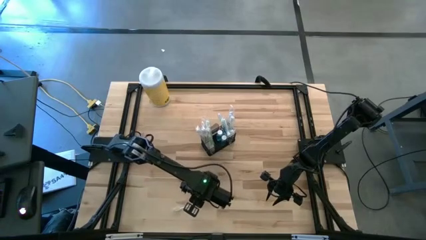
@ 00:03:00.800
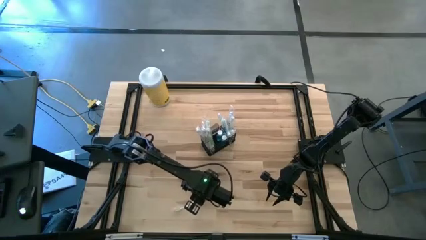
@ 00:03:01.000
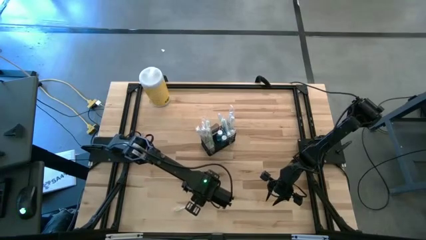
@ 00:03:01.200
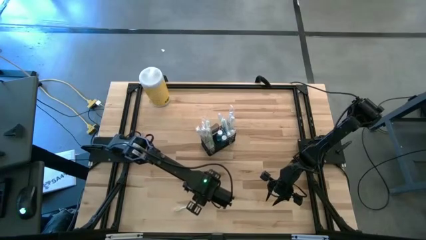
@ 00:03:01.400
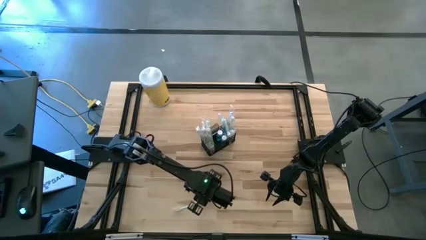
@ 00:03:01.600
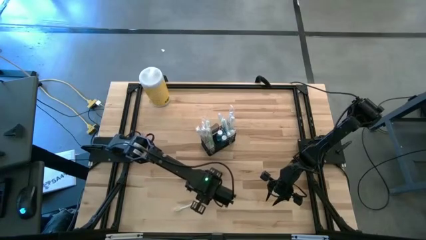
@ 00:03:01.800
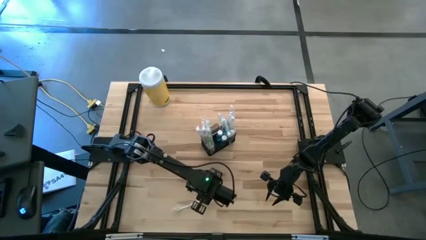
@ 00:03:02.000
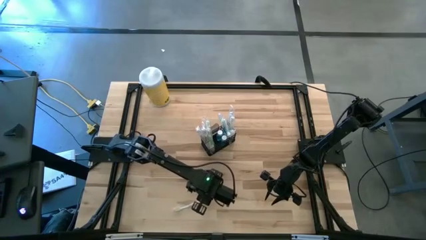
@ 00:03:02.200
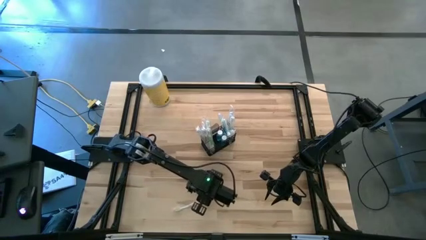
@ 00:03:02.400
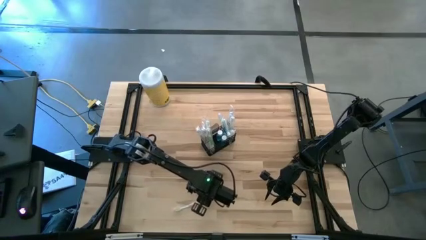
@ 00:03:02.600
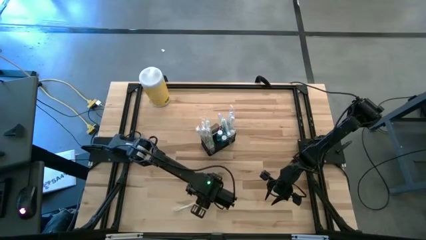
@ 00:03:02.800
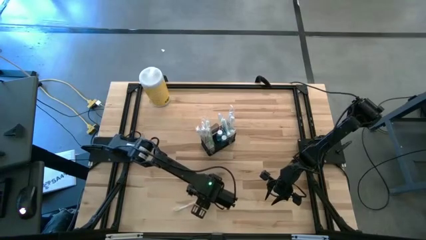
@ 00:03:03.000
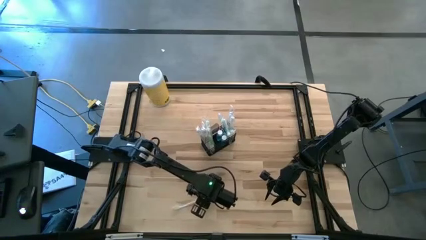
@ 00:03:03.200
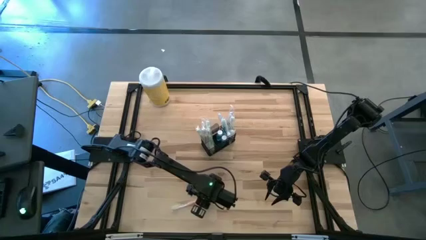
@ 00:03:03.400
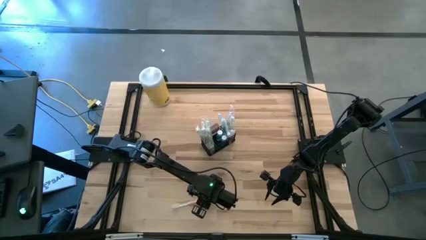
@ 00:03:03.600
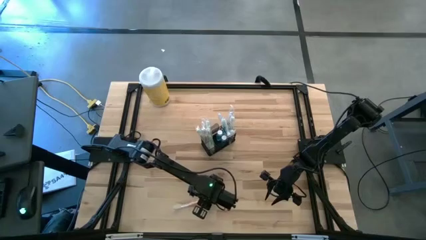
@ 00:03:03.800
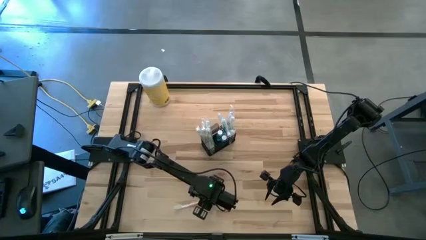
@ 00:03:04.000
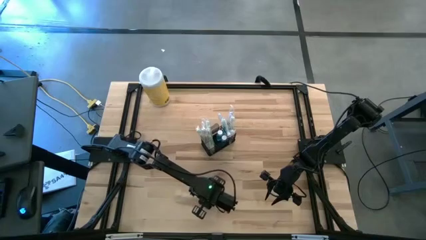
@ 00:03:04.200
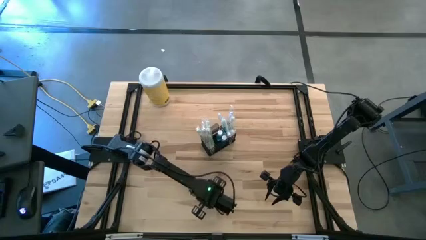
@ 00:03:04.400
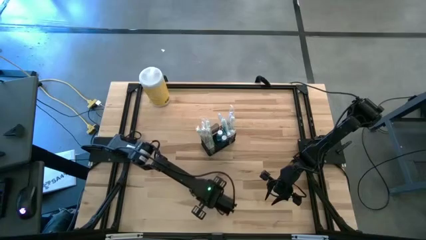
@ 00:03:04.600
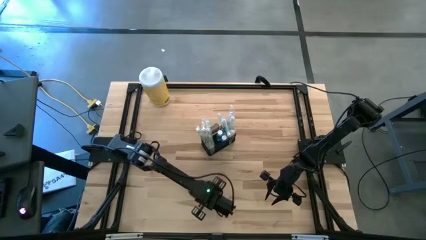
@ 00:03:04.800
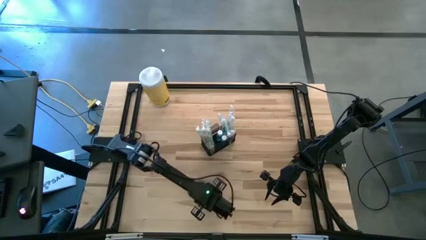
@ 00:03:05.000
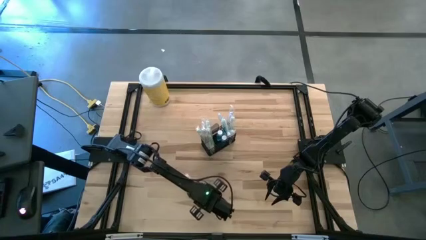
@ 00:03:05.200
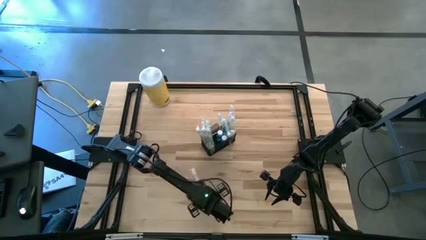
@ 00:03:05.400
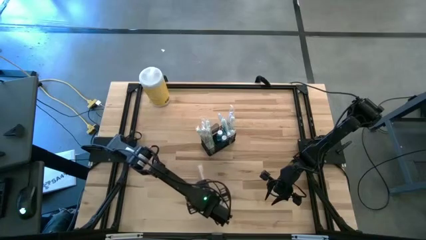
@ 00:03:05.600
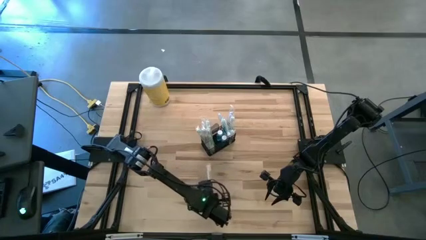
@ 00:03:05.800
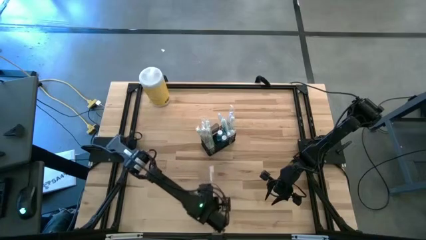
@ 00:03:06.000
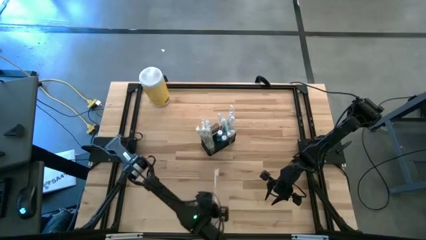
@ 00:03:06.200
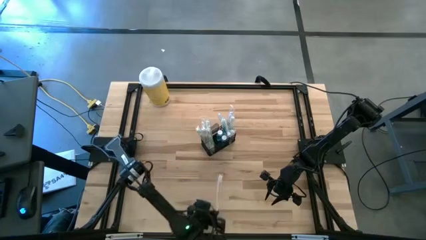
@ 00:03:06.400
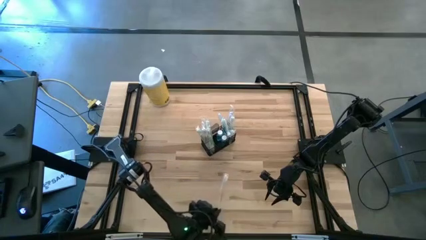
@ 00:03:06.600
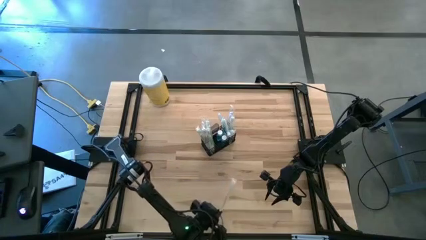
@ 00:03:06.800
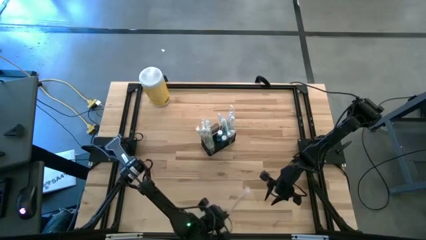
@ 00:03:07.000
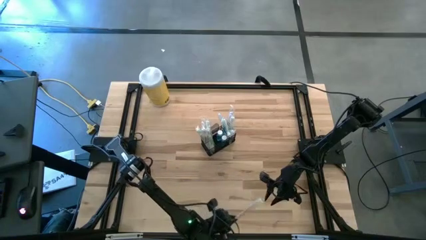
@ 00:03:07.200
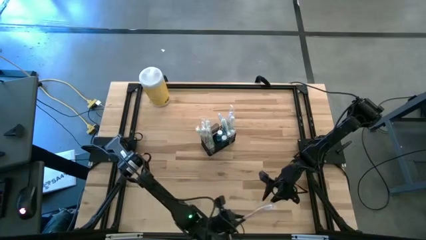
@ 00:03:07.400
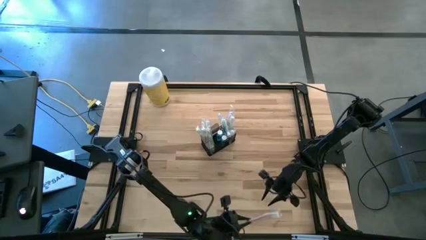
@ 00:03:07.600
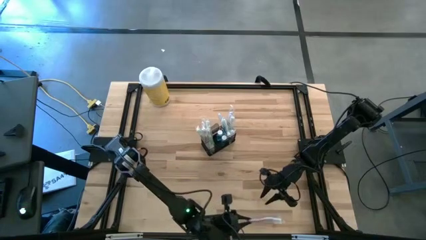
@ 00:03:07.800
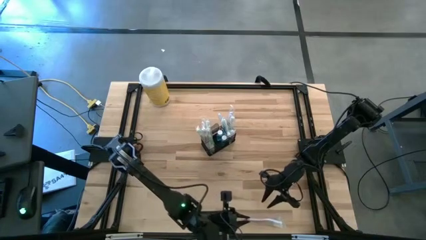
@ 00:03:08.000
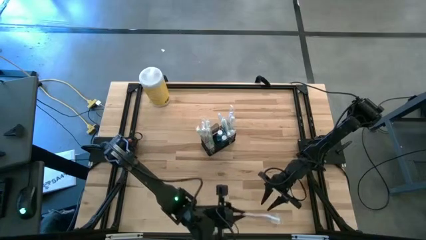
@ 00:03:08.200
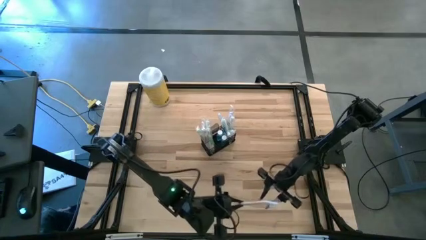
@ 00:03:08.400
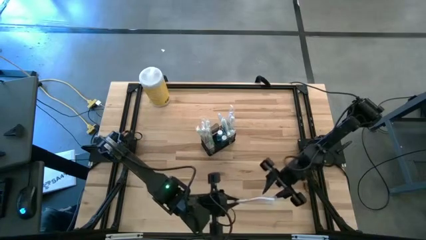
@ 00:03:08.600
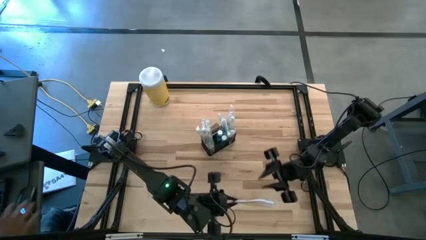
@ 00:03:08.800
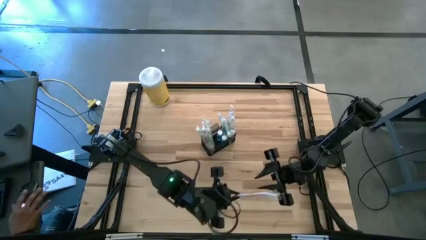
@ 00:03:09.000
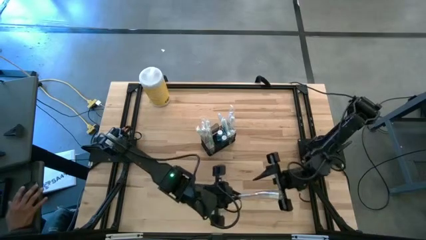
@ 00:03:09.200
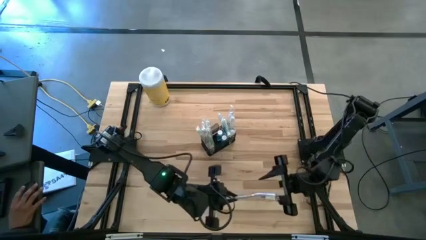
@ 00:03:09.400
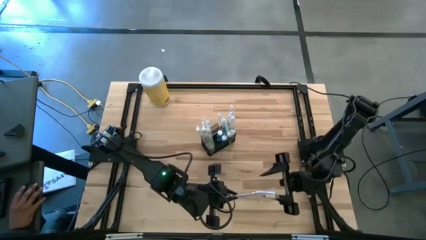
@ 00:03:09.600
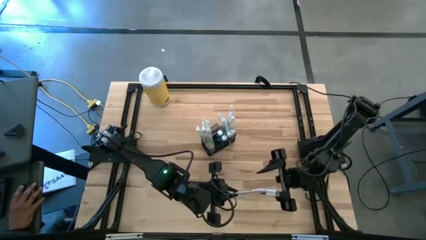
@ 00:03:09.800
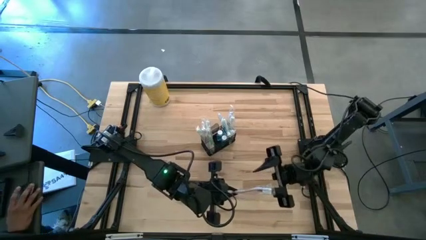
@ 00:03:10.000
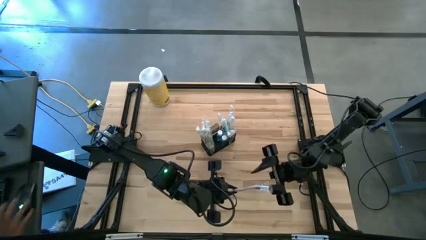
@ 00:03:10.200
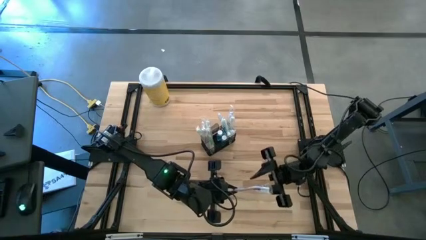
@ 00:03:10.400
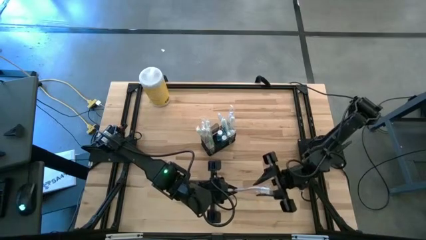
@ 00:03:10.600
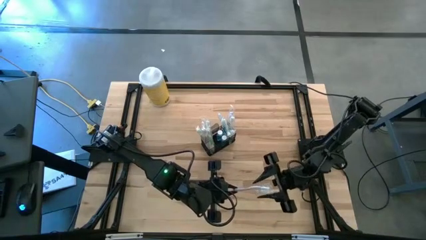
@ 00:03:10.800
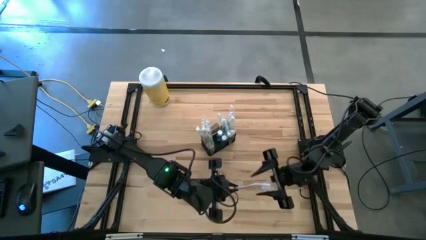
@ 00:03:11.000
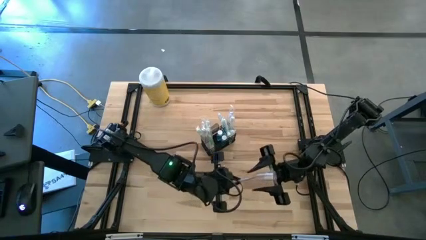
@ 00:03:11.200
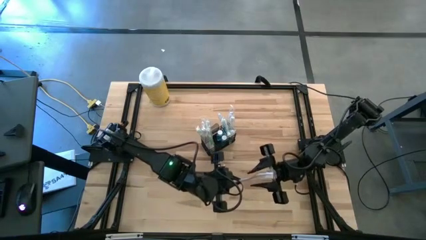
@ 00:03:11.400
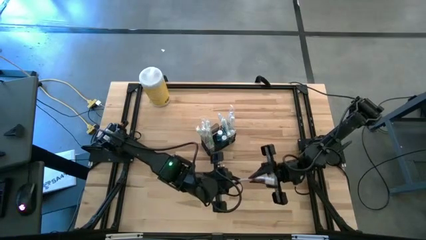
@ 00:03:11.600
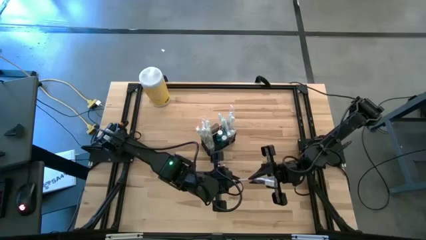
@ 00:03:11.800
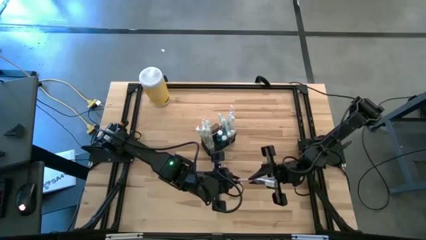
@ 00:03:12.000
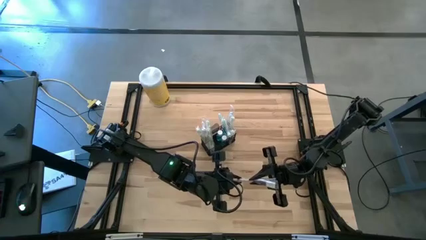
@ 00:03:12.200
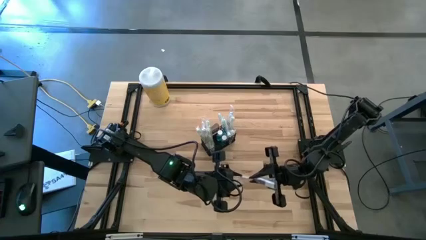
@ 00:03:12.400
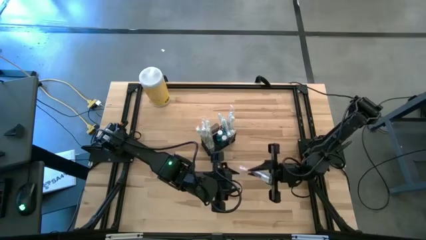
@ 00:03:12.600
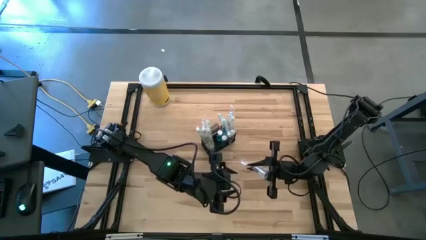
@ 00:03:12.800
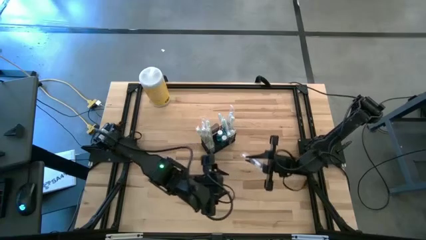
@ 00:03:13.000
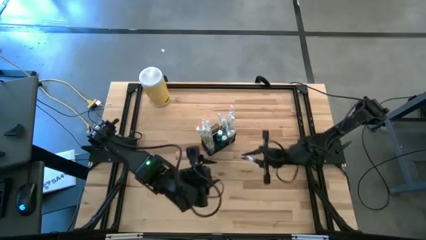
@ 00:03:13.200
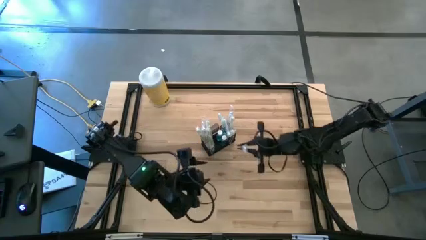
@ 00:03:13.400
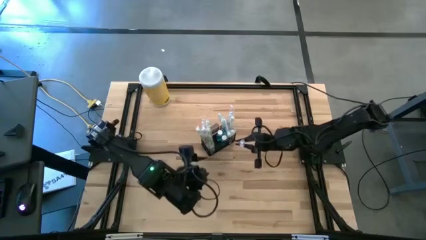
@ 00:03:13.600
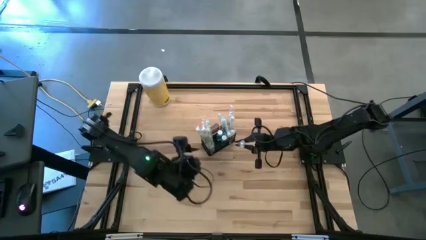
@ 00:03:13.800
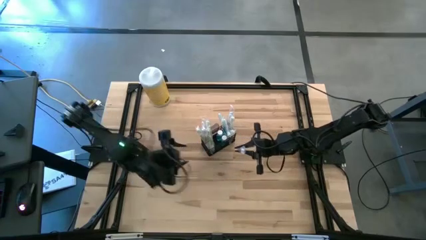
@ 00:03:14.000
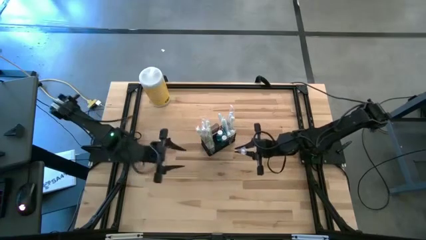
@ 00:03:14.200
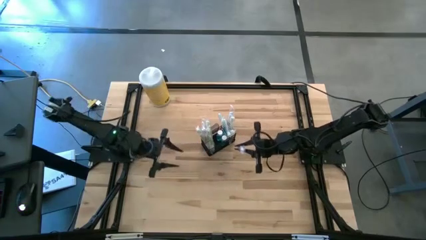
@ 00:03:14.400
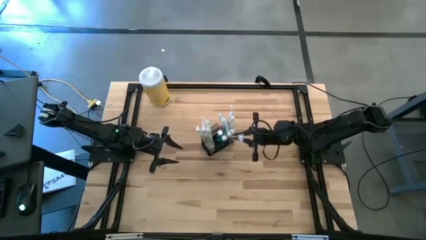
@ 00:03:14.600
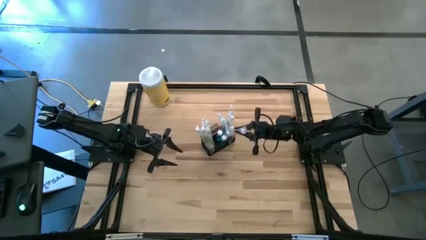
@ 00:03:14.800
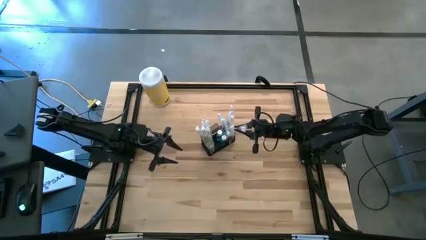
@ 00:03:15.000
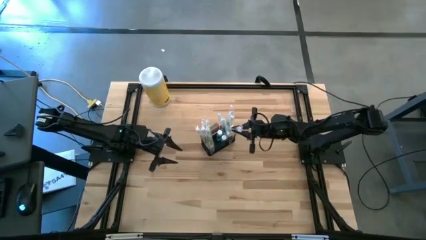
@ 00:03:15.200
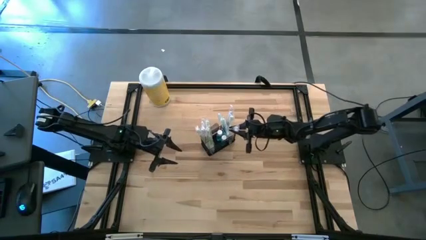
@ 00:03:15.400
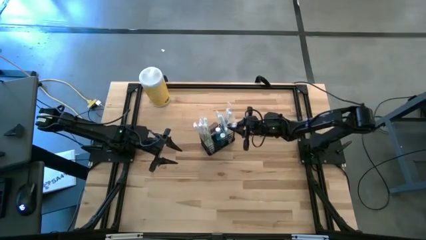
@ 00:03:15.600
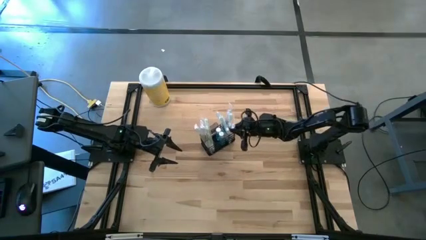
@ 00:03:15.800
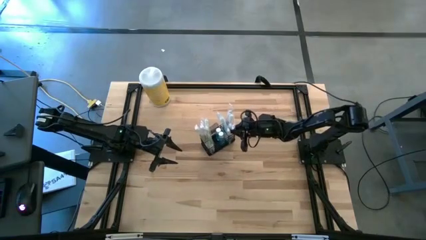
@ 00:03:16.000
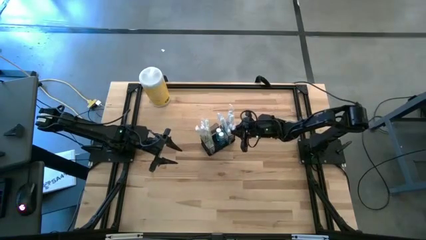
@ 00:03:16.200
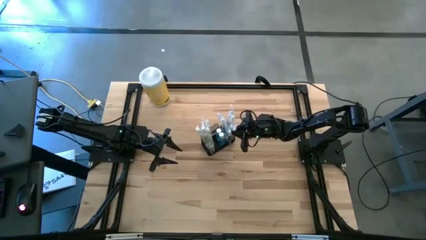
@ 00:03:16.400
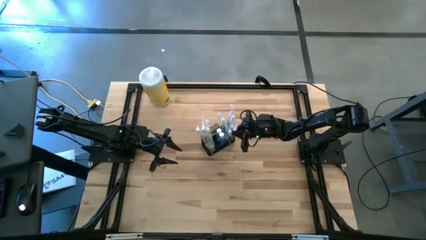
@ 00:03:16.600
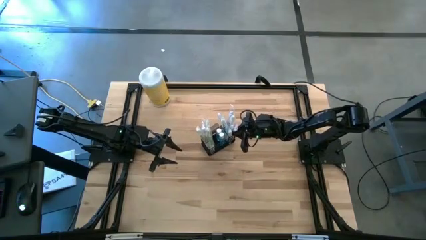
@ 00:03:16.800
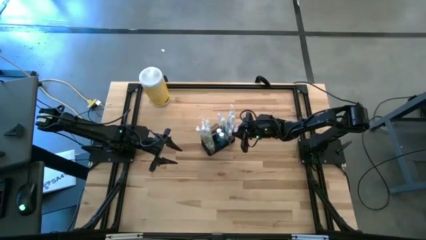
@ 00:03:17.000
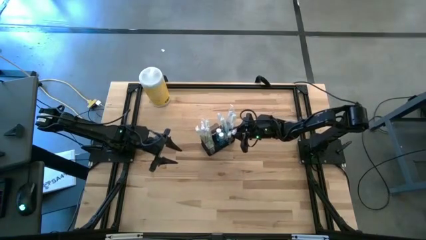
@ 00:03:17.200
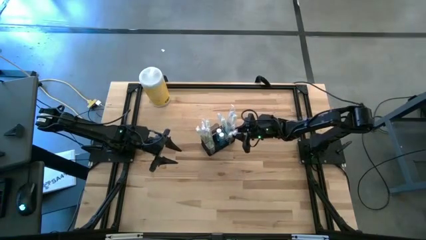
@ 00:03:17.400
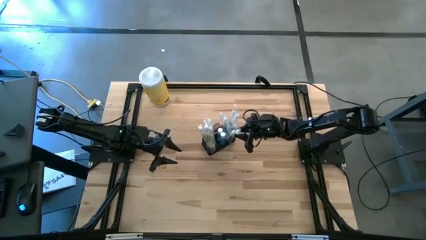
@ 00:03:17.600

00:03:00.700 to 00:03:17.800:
Task: Pick & Place toothbrushing station
Put the orange toothbrush into the wire organizer
